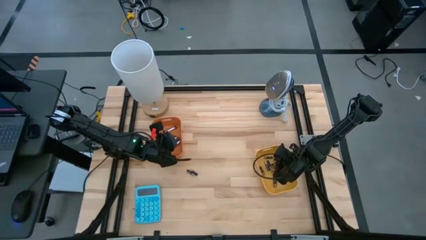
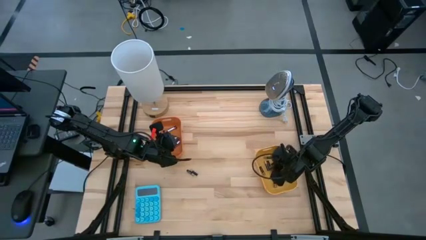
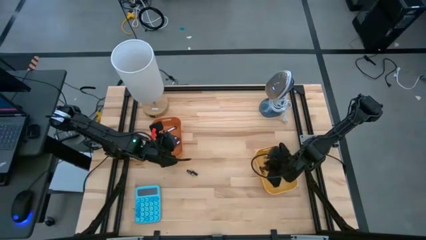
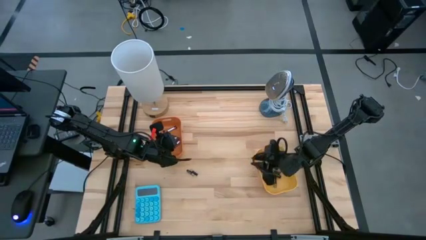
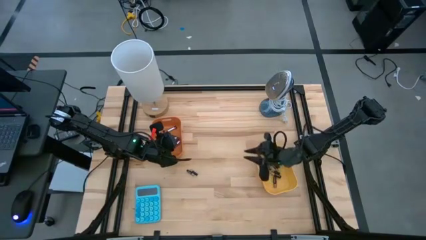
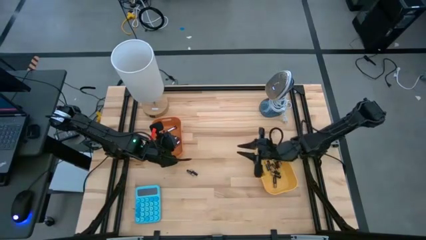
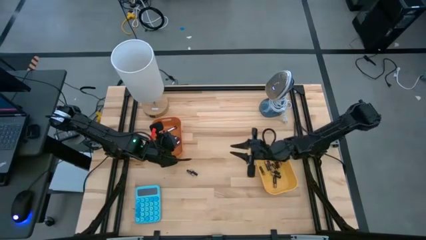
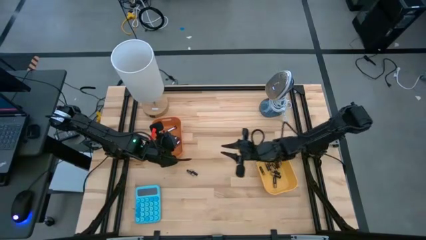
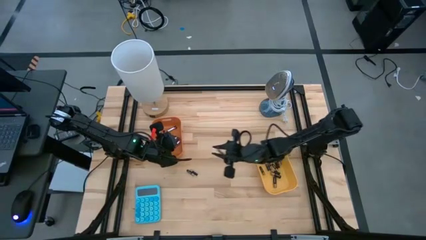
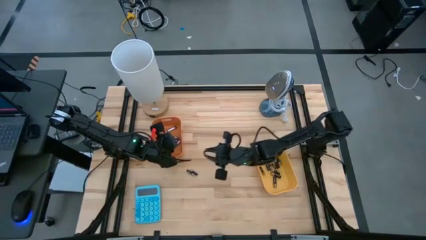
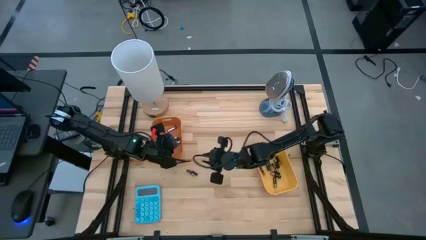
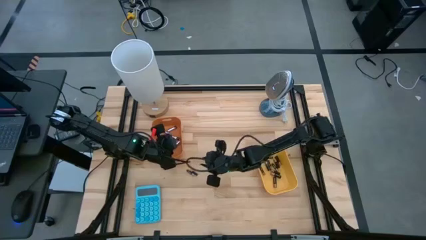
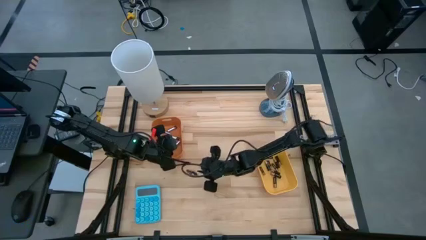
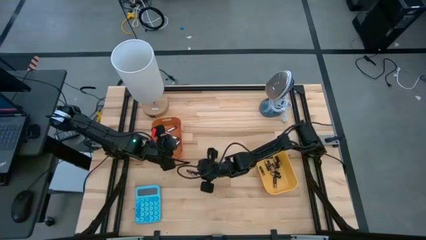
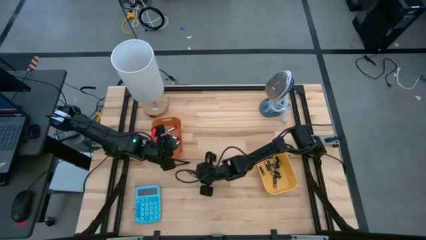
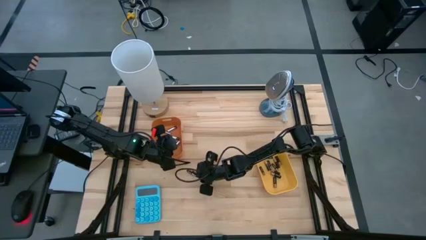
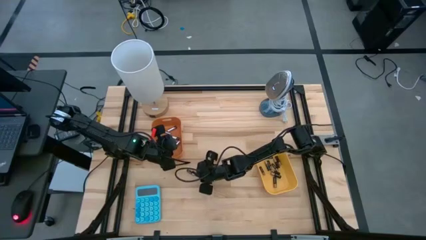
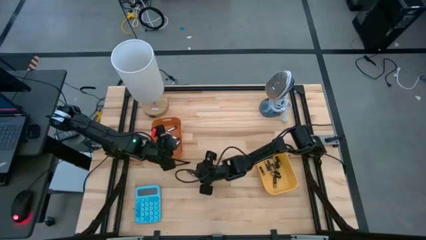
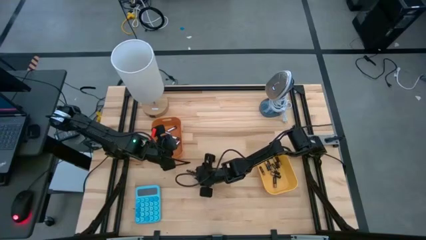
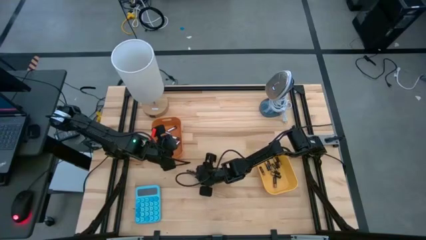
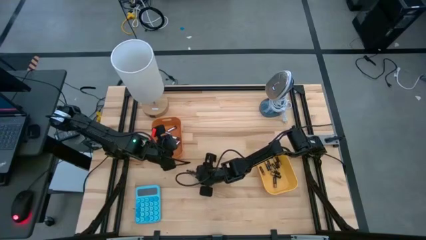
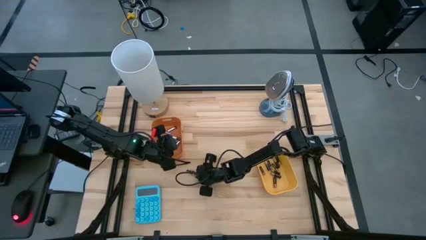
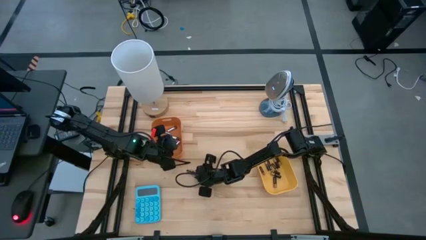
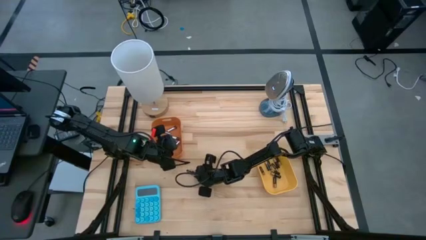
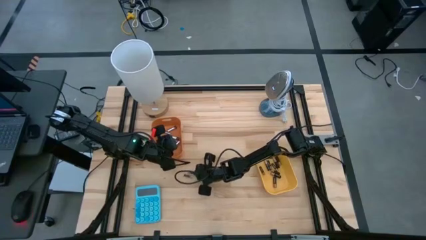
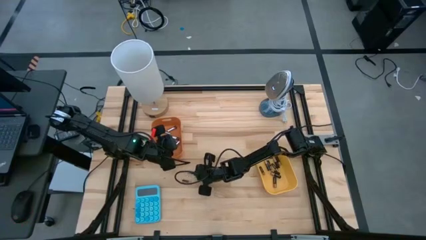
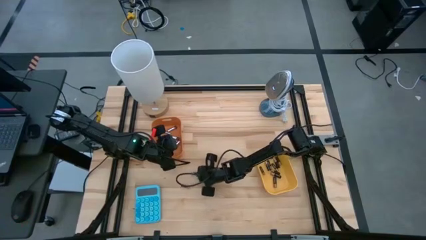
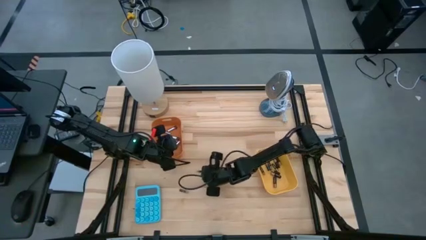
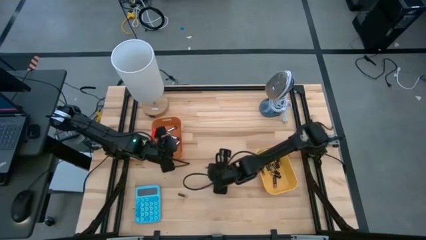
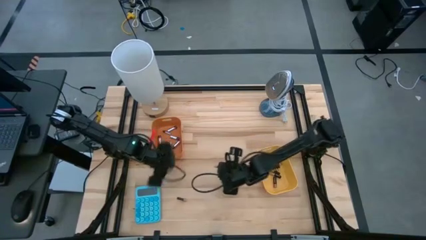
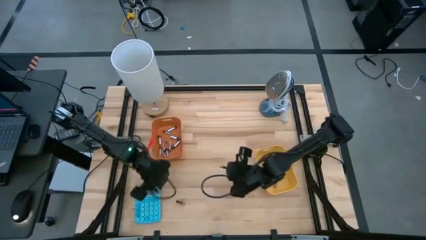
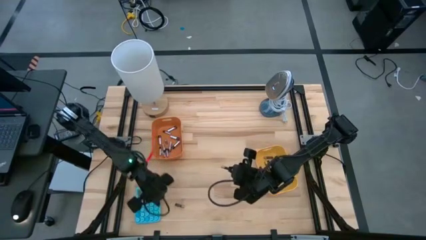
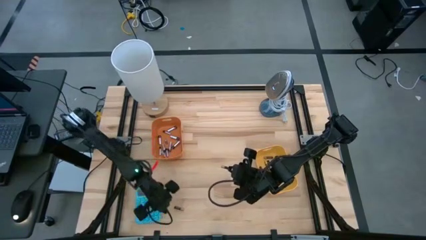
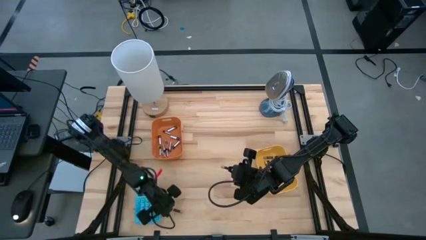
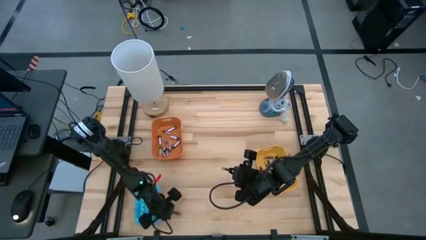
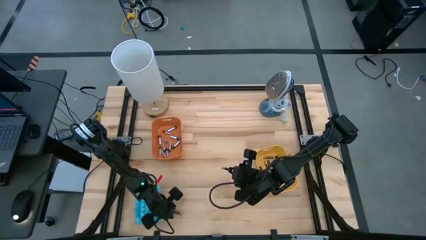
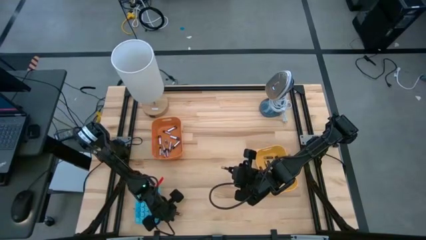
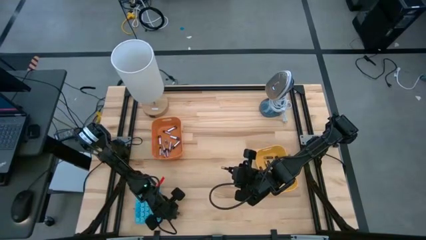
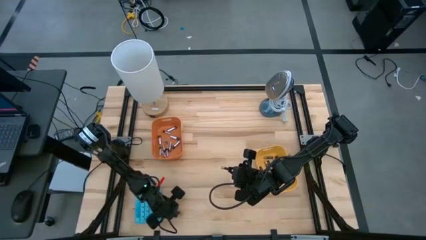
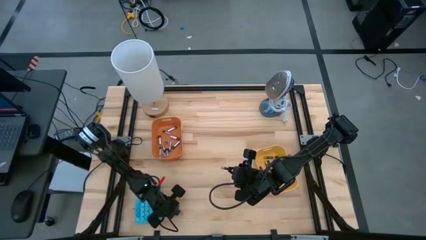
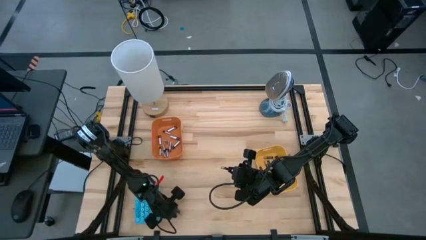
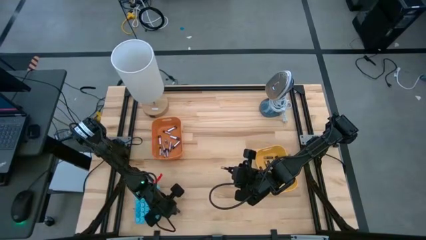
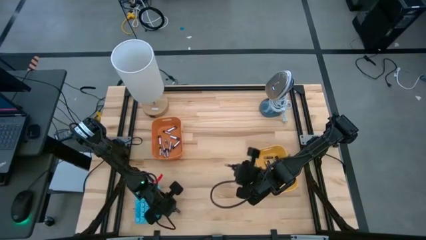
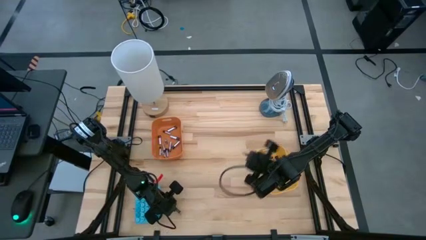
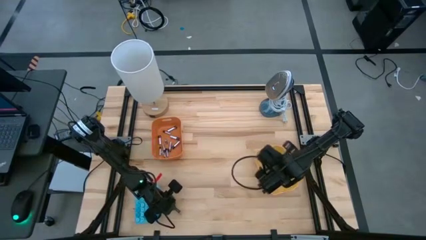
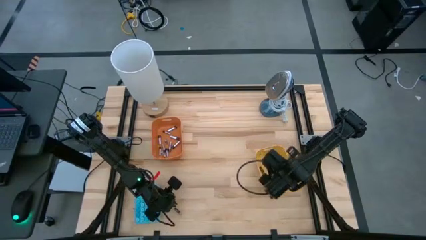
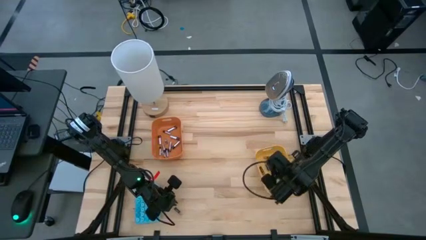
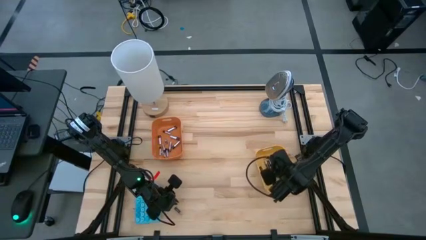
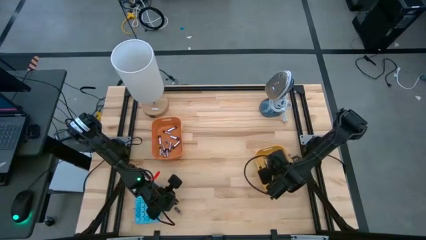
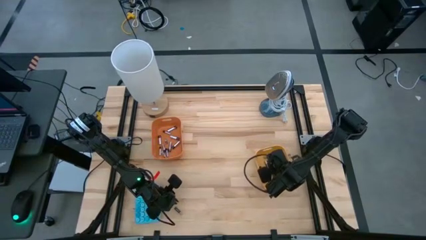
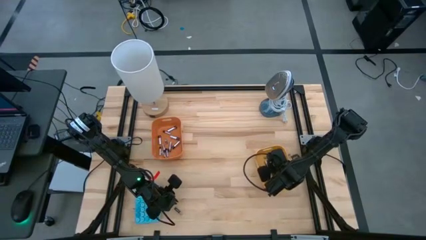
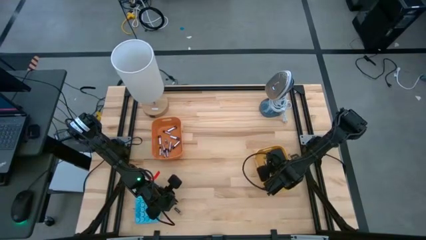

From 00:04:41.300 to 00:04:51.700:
Task: Sort batteries
Put the gold battery into the yellow bin

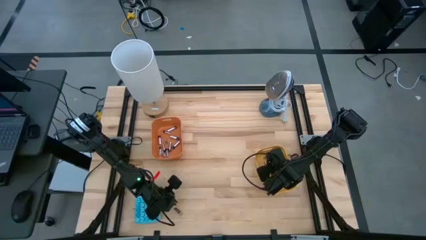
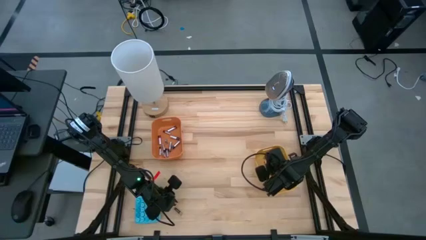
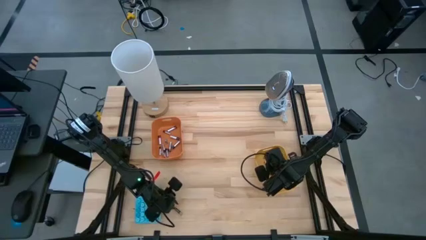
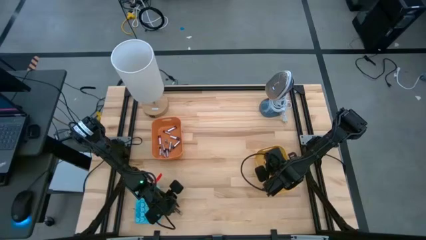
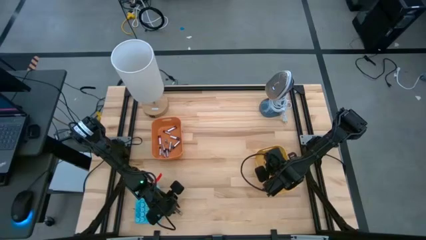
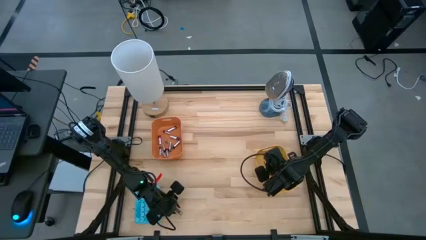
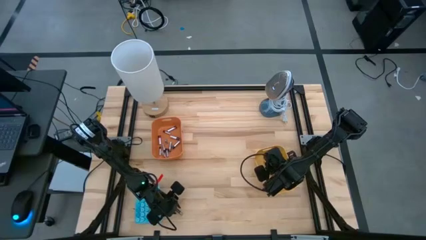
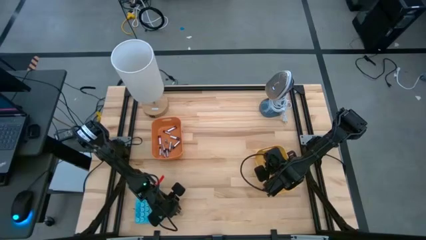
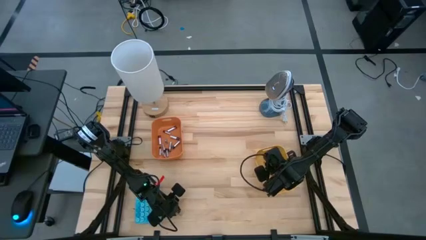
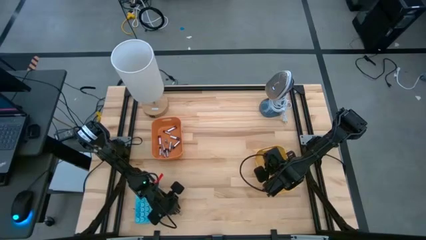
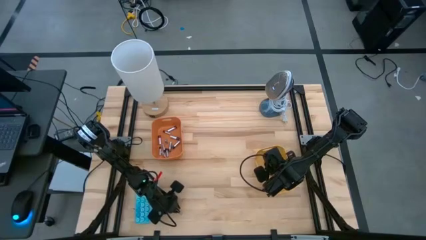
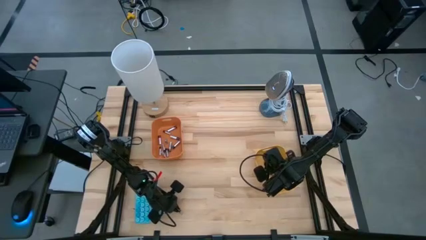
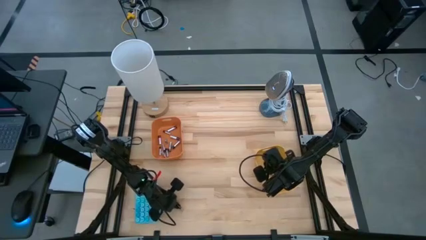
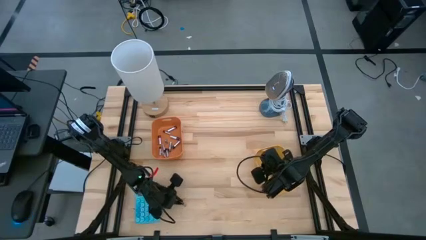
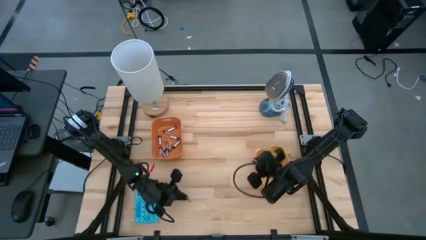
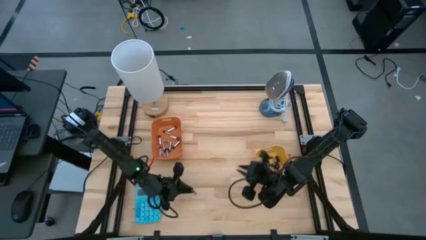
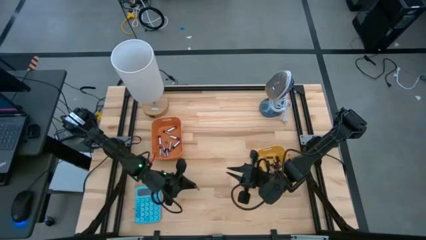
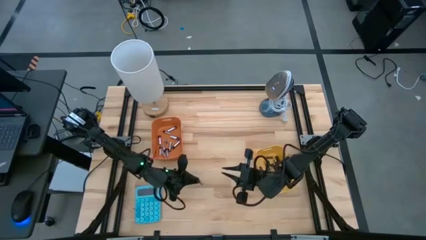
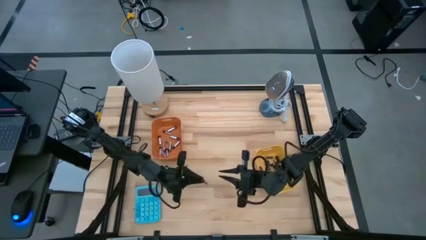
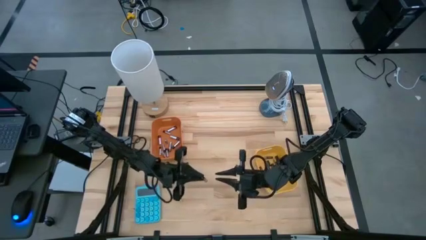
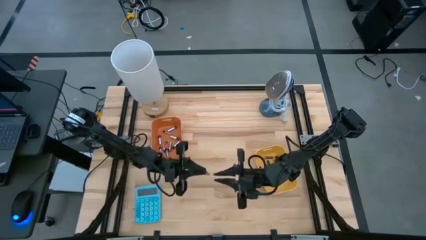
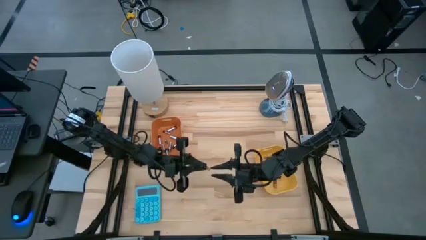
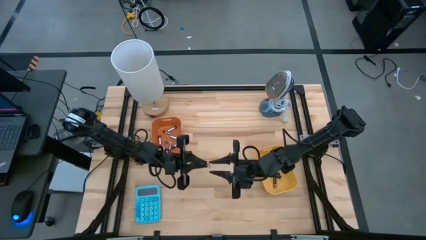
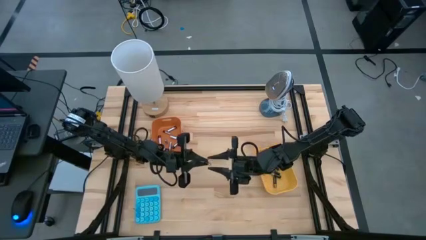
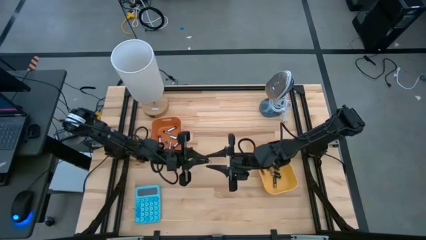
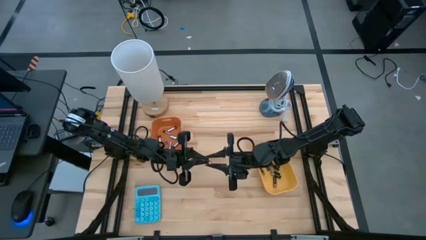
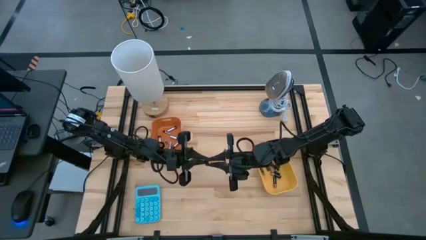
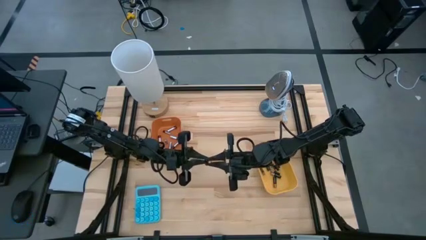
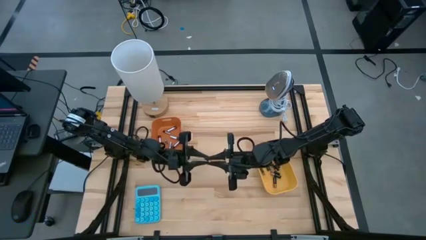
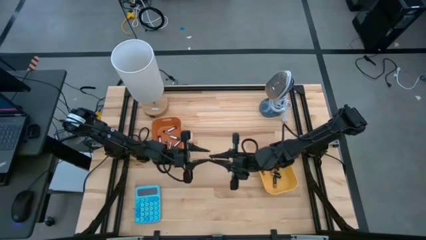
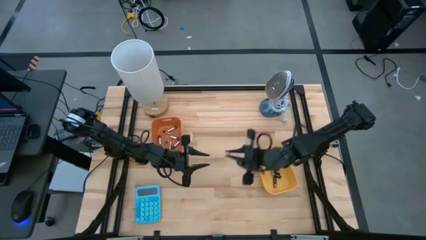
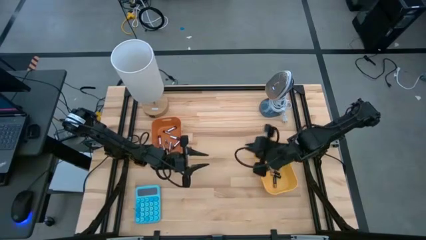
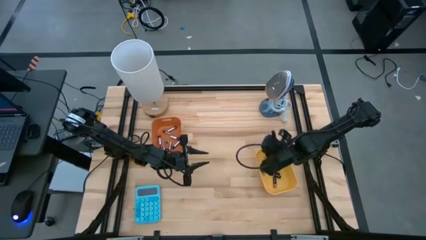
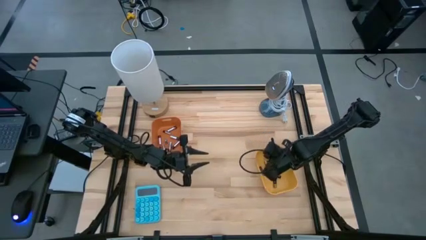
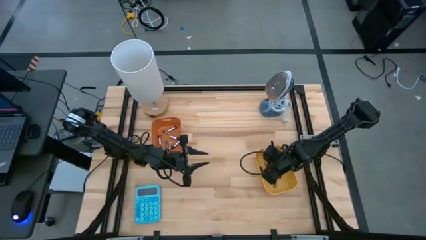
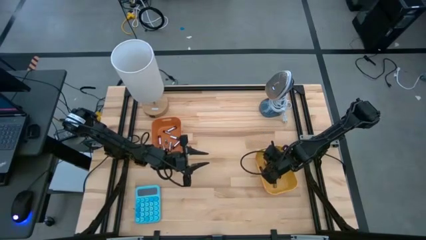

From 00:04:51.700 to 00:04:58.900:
Put the gold battery into the yellow bin
